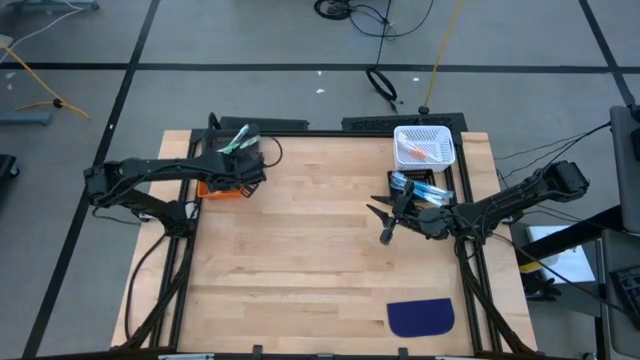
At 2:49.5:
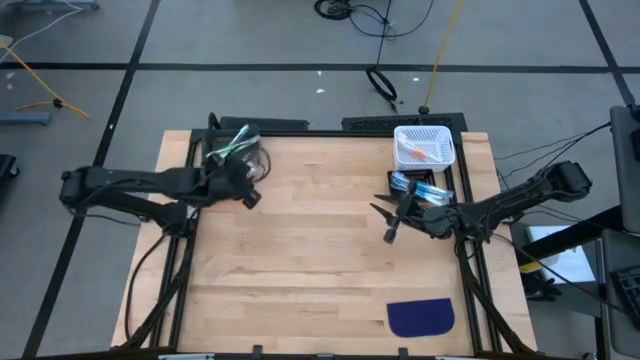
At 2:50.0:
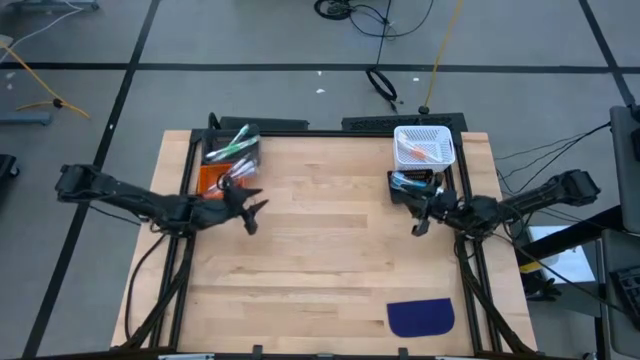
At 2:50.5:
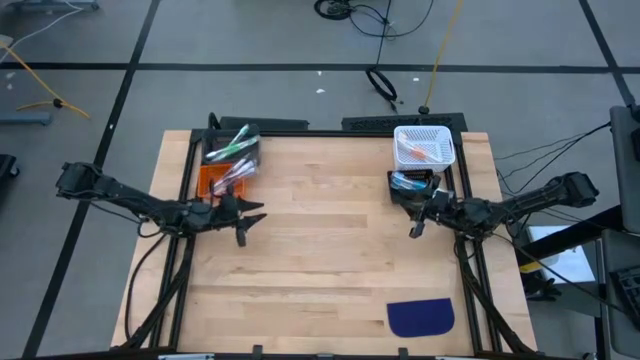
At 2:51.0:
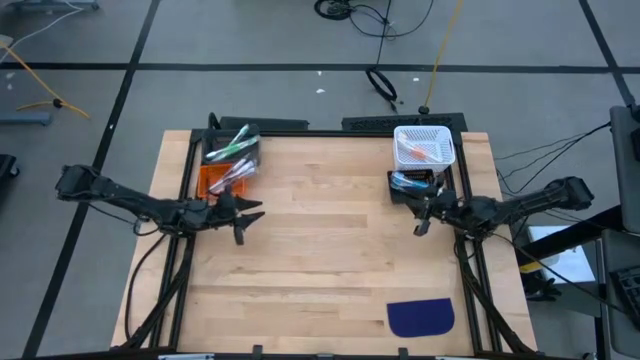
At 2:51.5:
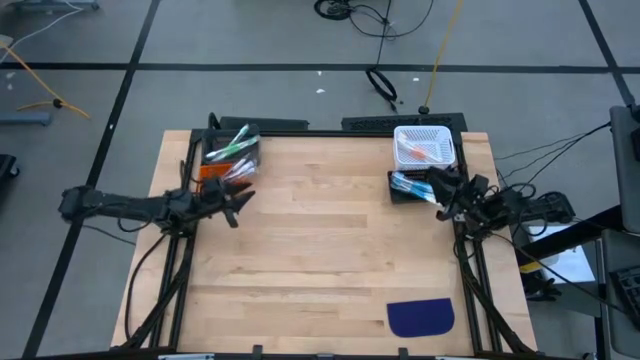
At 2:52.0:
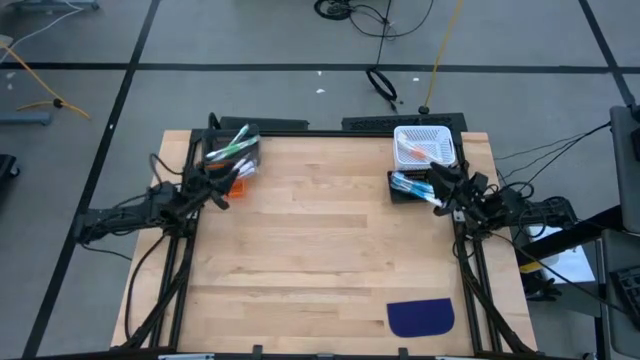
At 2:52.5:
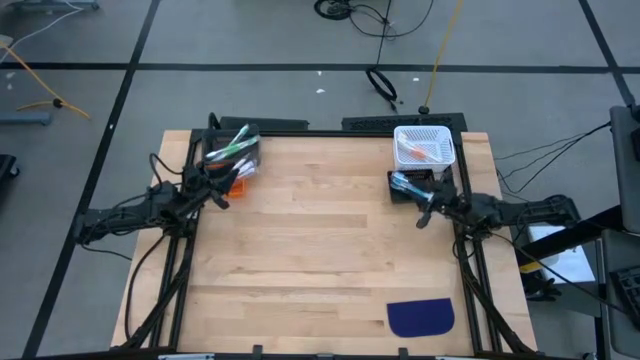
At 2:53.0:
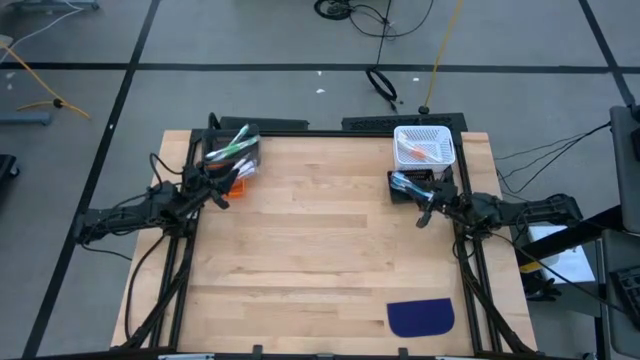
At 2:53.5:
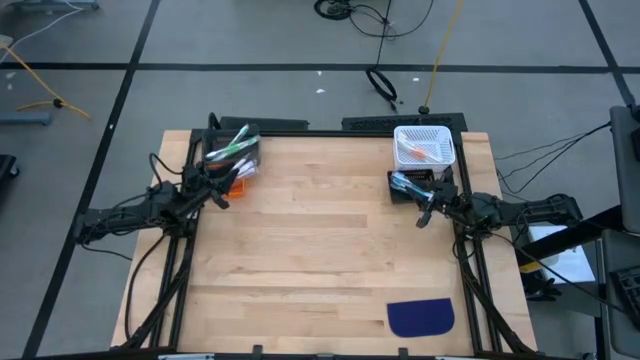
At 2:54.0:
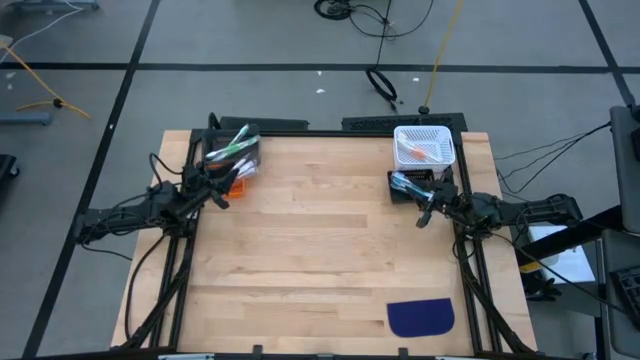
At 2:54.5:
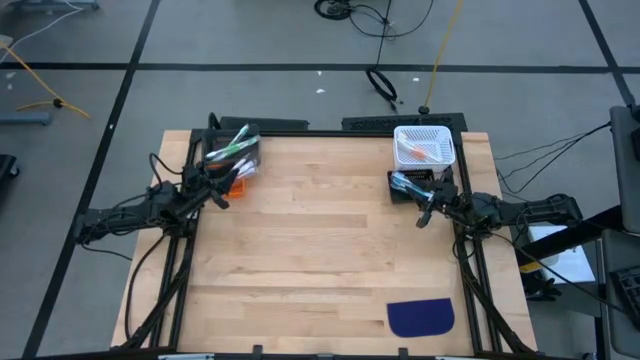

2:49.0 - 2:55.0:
Task: Pick & Place Toothbrushes
Return to Home Position

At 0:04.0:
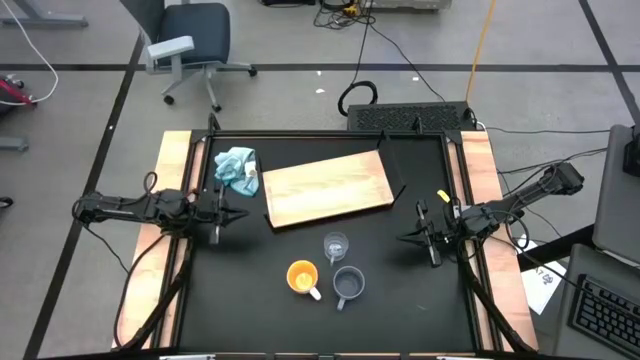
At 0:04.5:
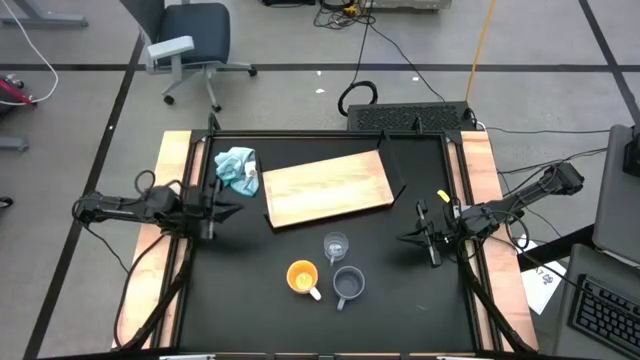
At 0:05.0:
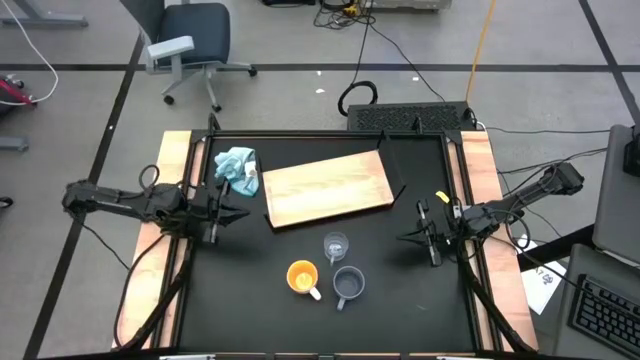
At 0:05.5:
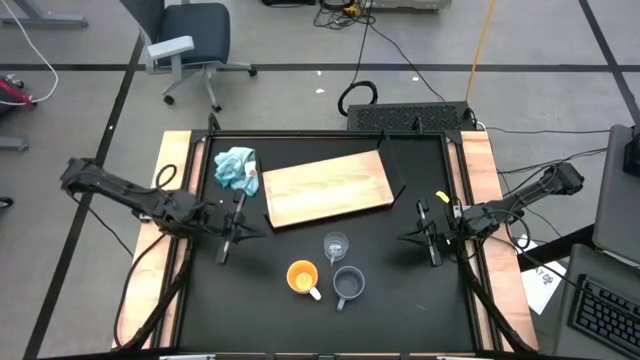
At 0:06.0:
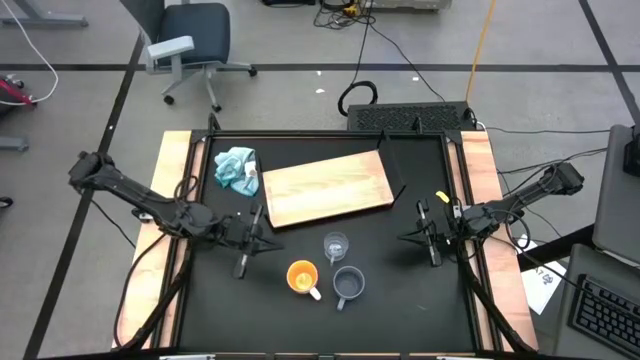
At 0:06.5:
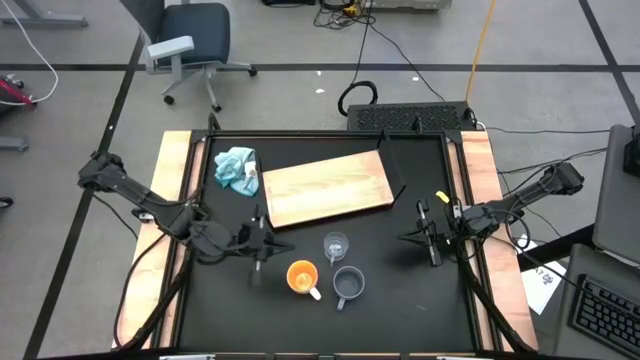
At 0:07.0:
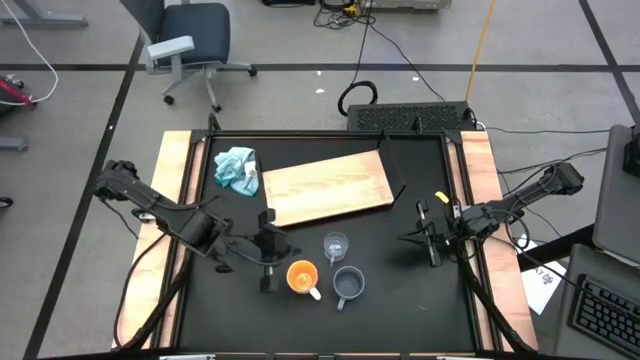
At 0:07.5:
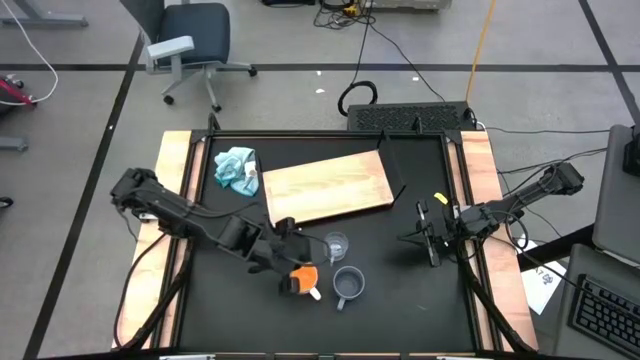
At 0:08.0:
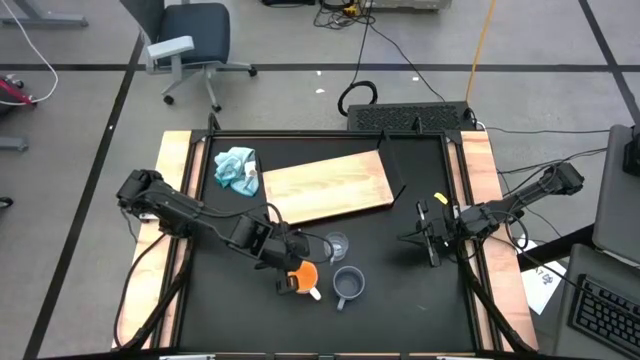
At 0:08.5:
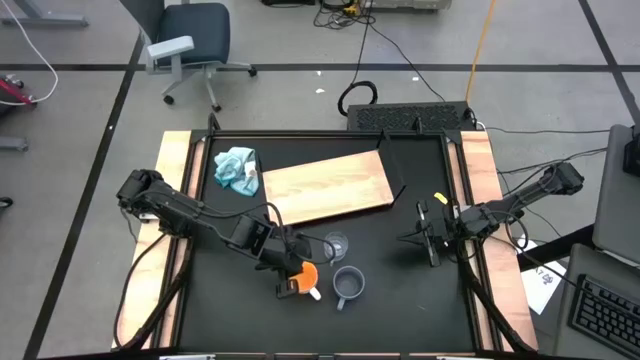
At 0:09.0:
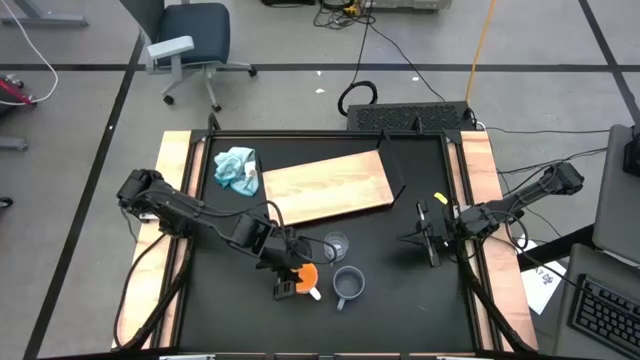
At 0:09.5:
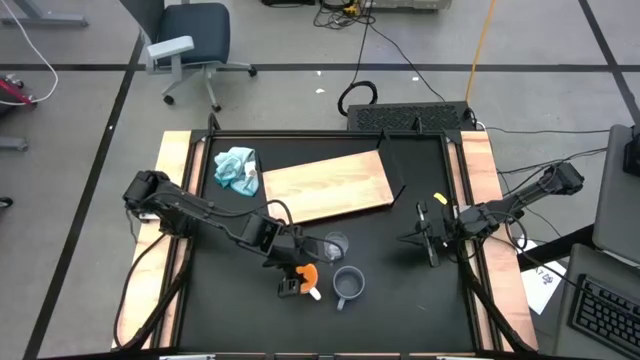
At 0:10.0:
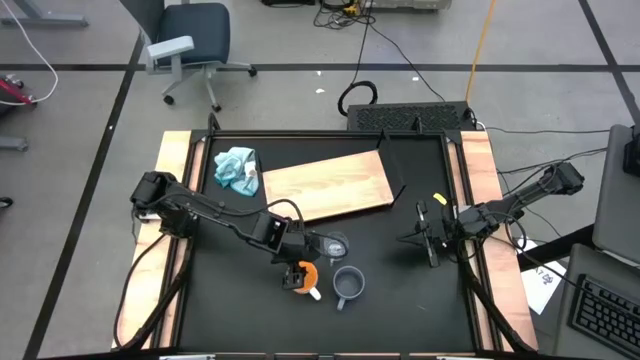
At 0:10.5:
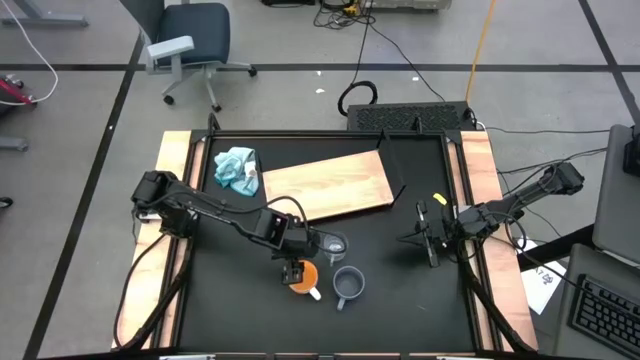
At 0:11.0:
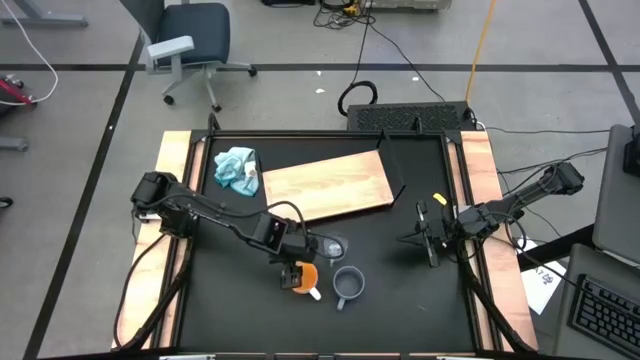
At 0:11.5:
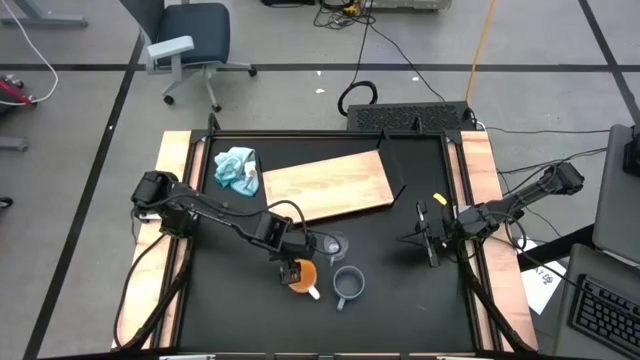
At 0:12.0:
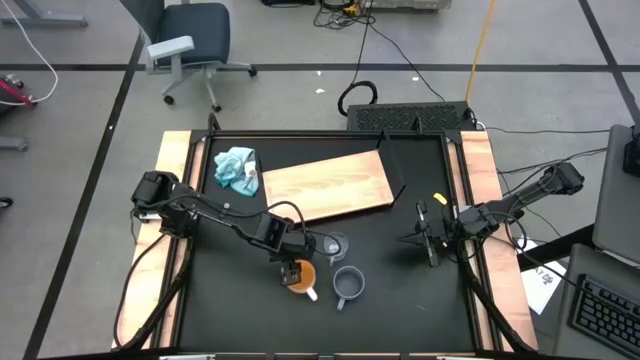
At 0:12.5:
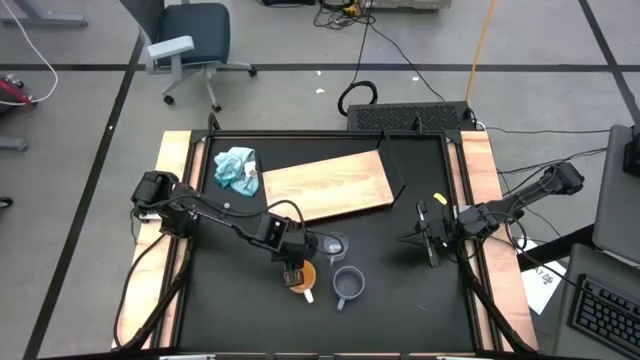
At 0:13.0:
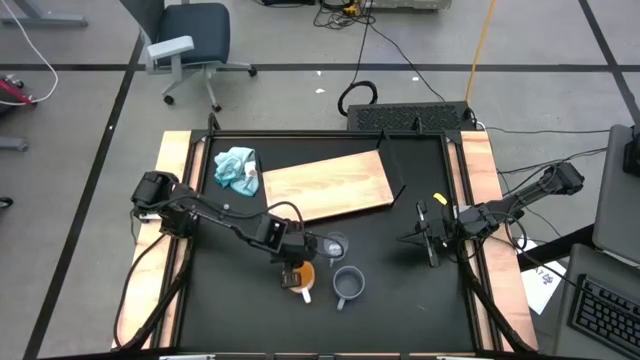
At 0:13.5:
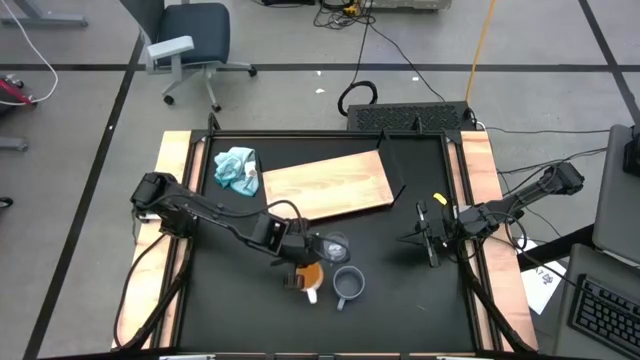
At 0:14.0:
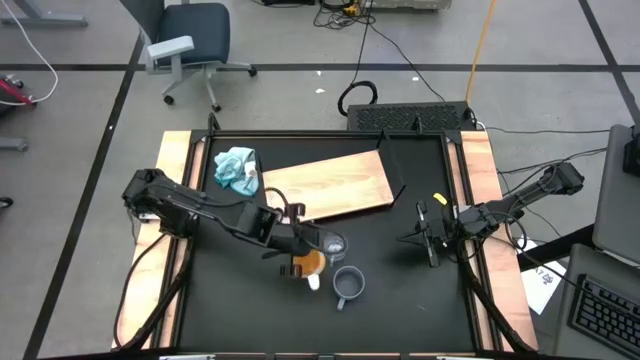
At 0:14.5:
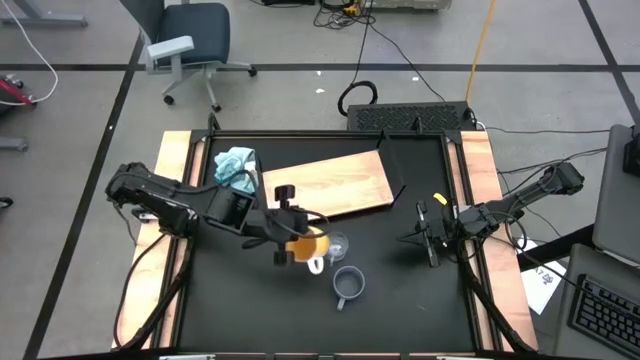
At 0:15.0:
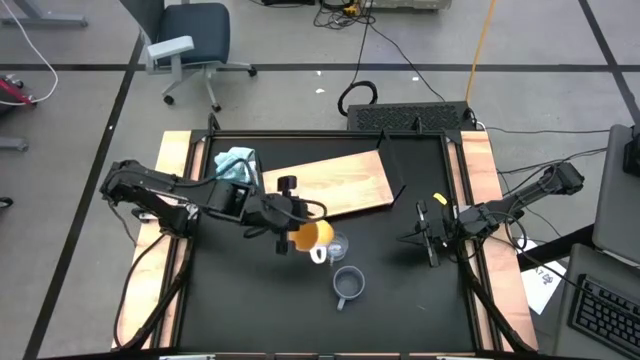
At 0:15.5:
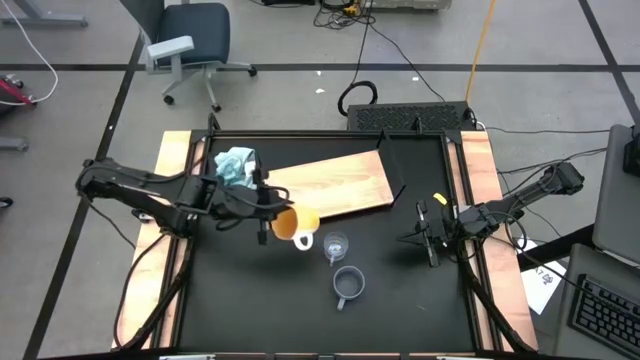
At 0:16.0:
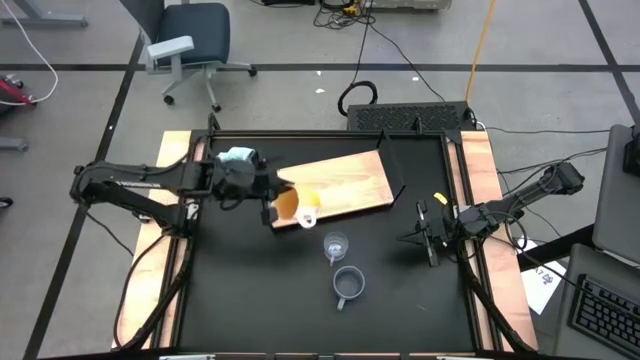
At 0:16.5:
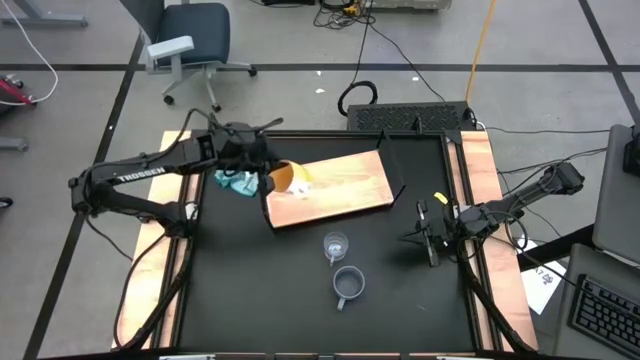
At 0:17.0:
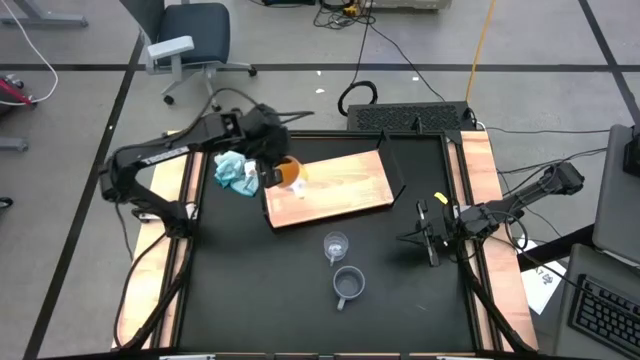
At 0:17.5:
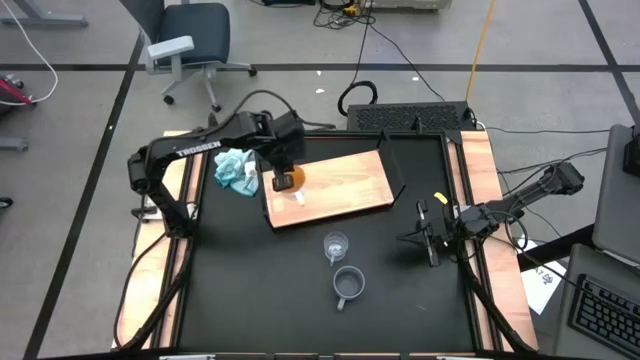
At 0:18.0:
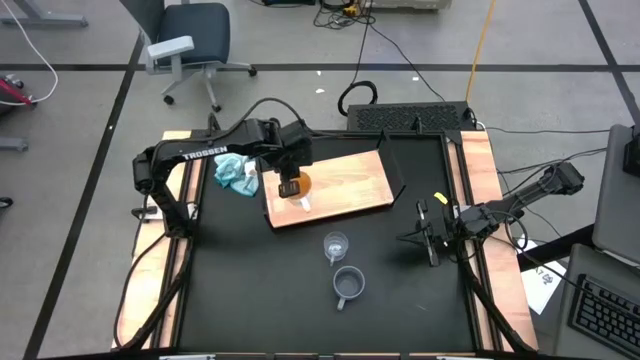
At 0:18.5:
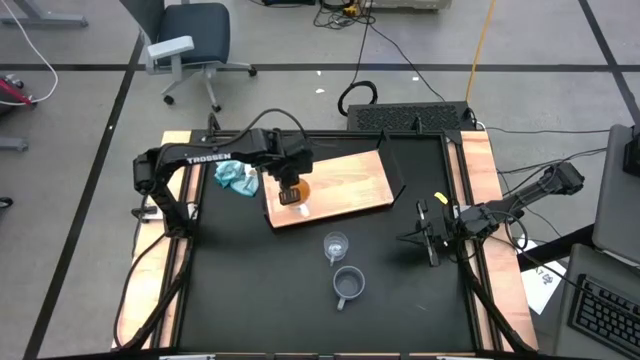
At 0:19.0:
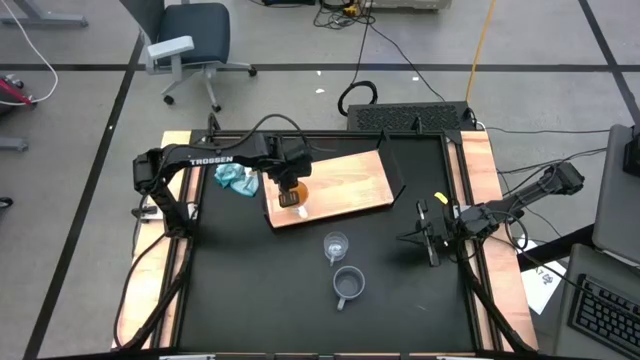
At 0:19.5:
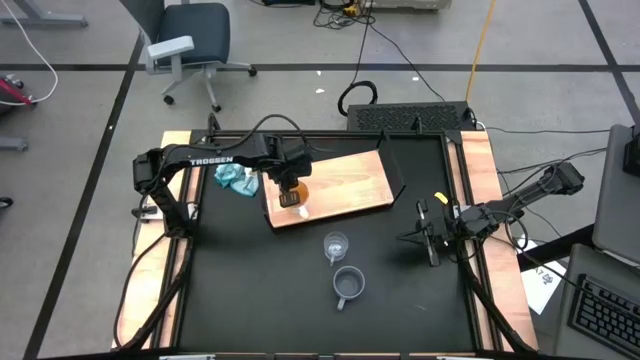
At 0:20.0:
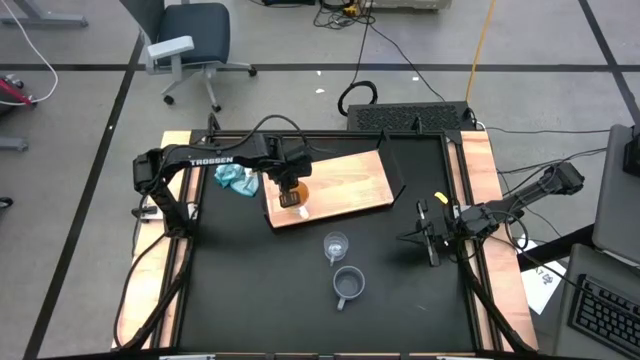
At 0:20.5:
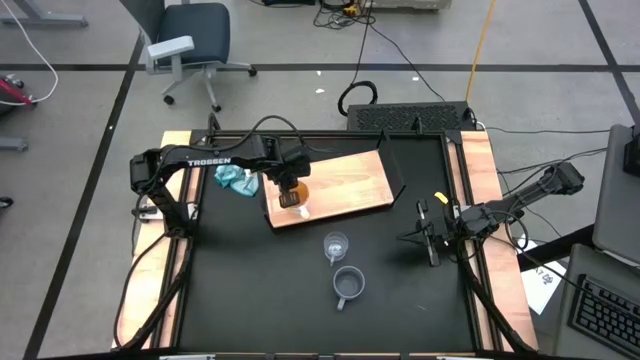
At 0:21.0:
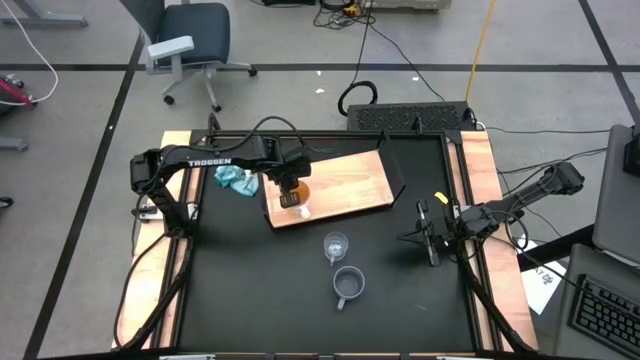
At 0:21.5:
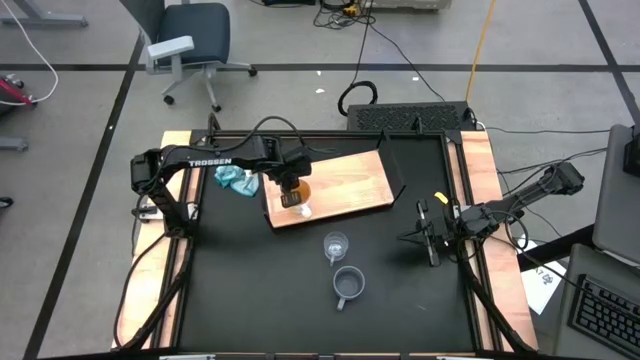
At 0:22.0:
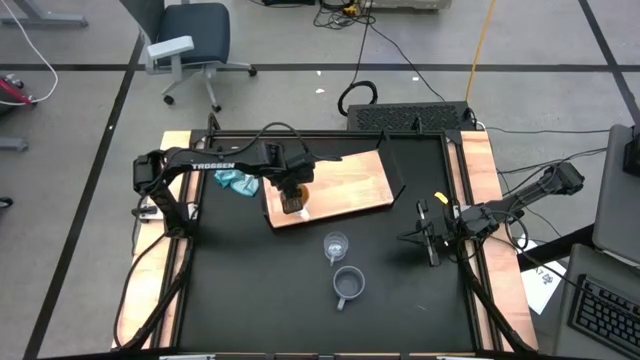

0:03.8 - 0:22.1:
Task: Stack small to large cups/mugs on shelf
Put the yellow mug onto the shelf
